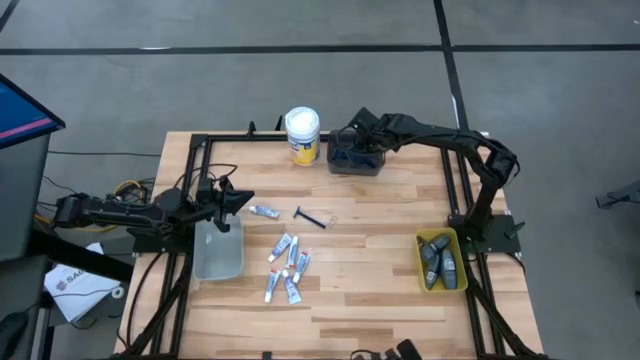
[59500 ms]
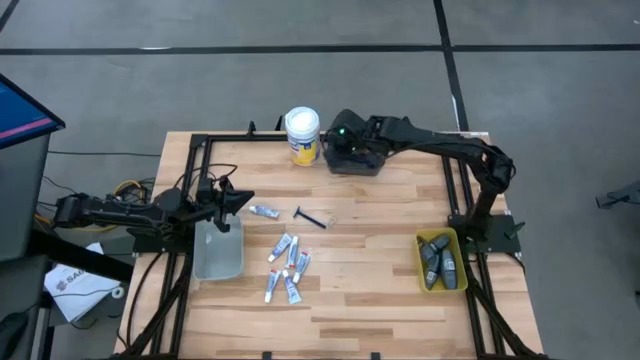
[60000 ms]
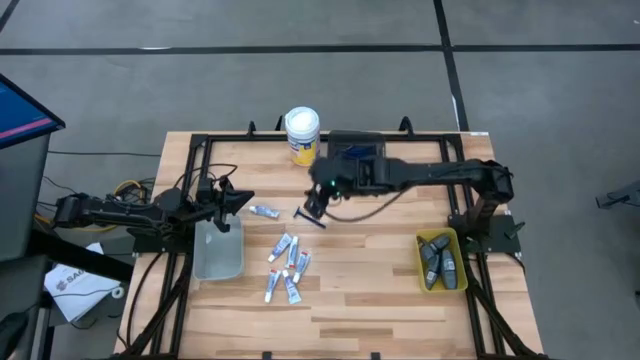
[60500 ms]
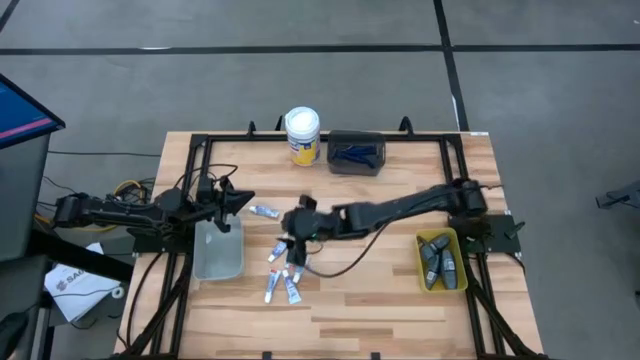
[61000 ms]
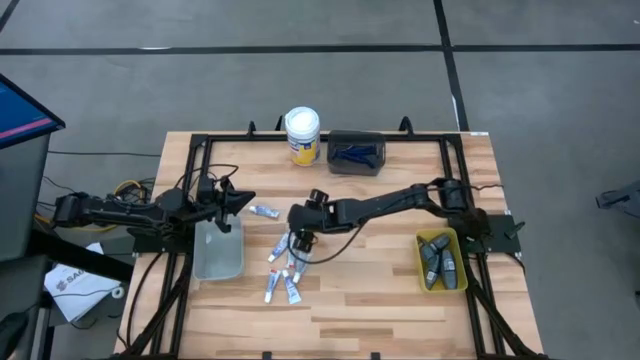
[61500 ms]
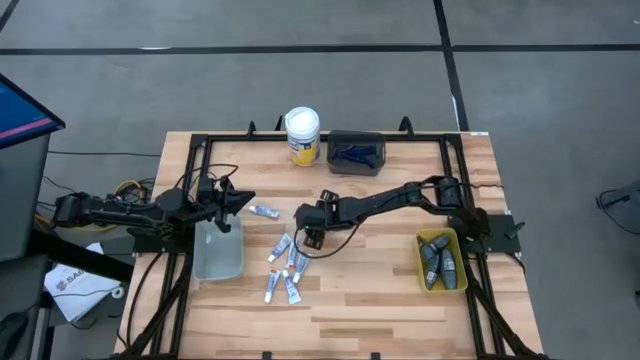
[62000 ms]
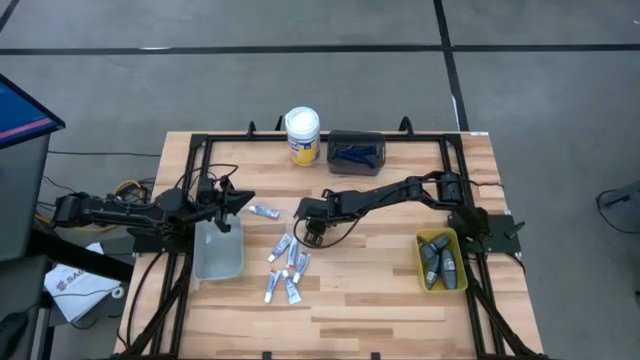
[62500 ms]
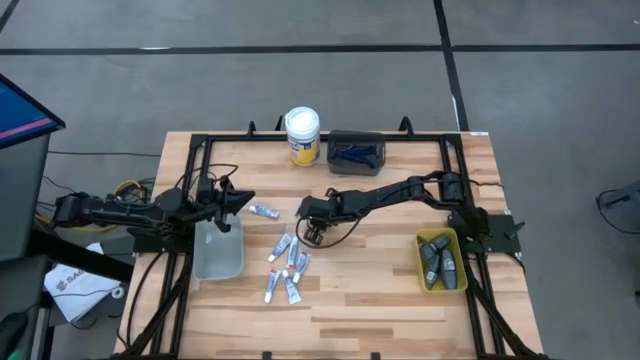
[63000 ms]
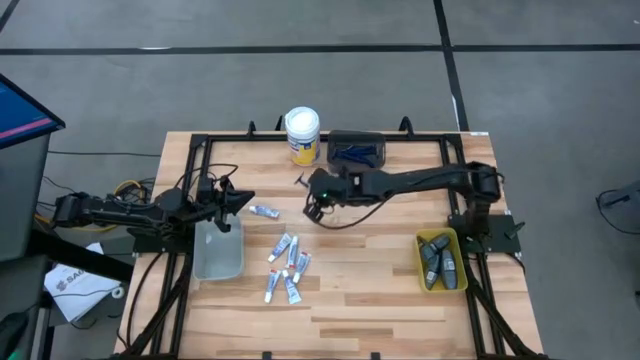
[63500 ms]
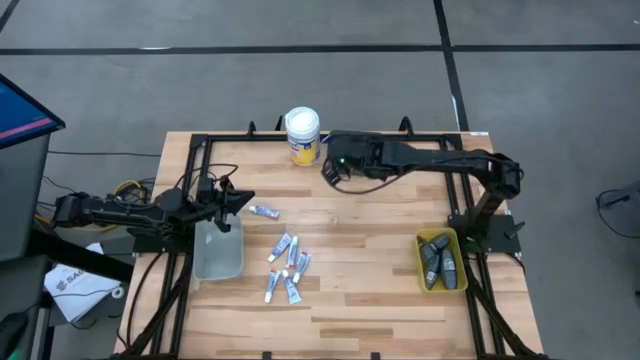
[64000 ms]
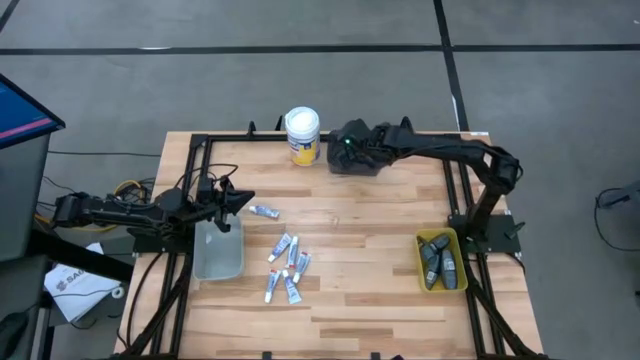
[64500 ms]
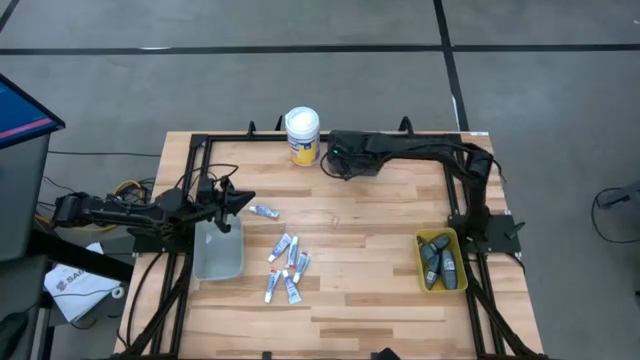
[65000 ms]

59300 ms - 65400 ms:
Task: Pick & Place Travel size toiletries
Put the blue razor into the black bin

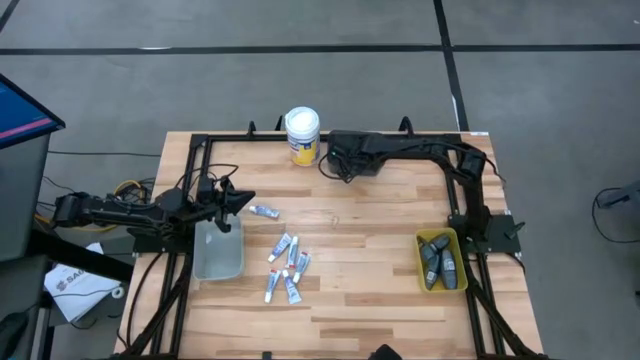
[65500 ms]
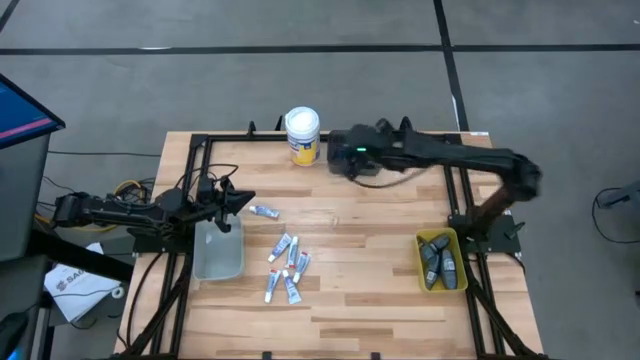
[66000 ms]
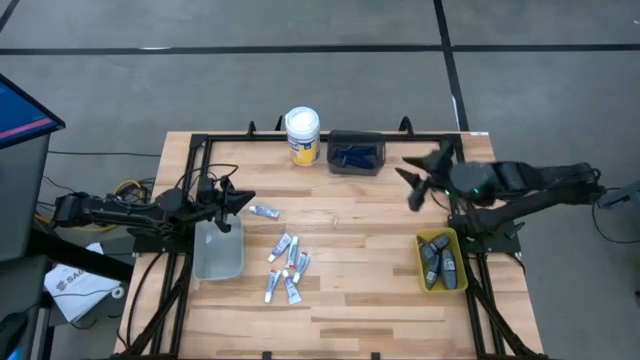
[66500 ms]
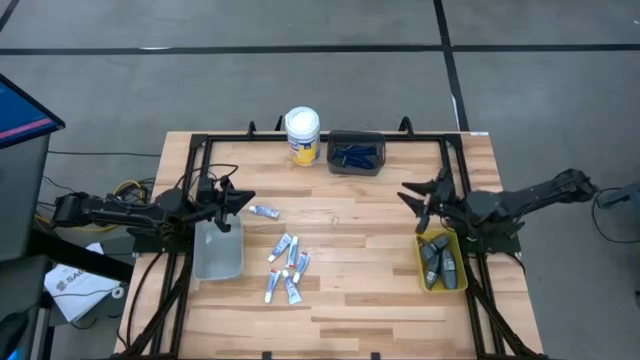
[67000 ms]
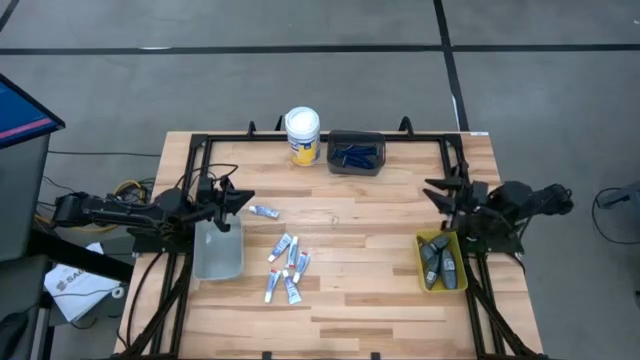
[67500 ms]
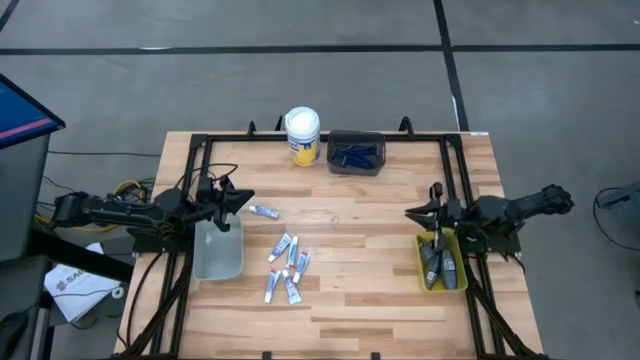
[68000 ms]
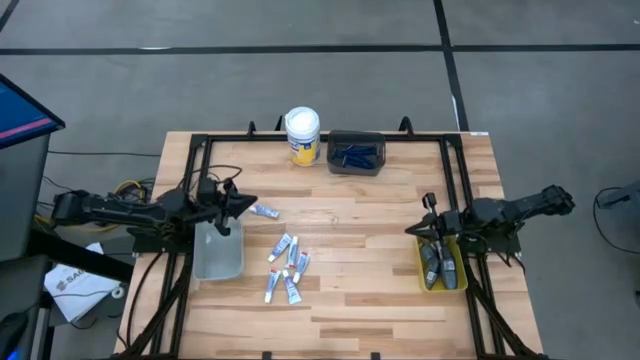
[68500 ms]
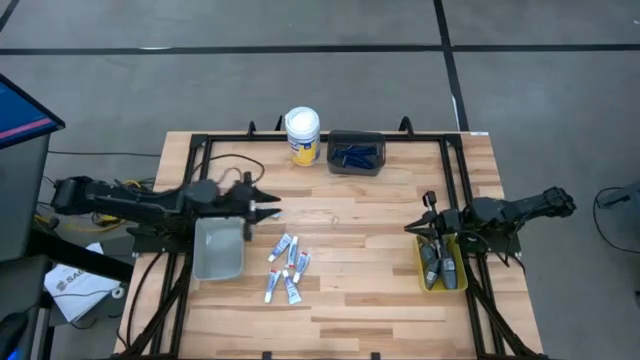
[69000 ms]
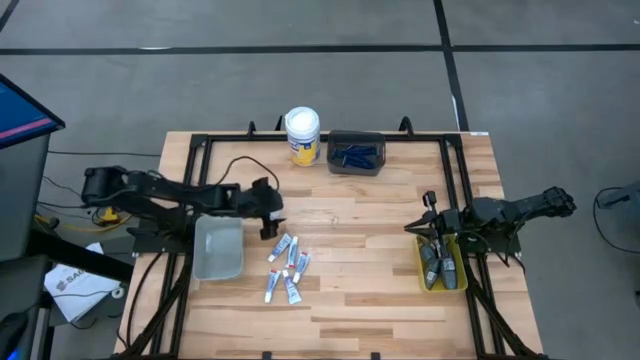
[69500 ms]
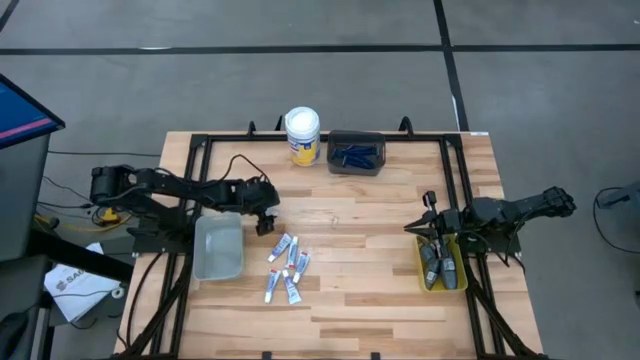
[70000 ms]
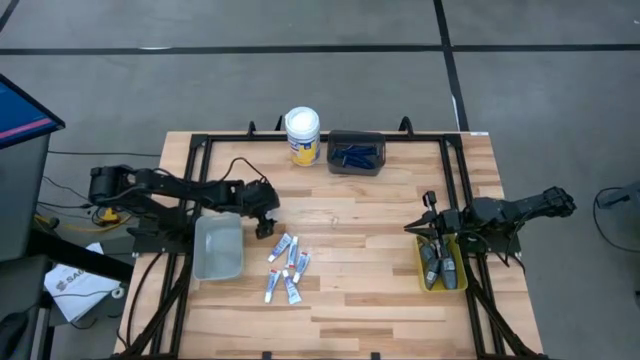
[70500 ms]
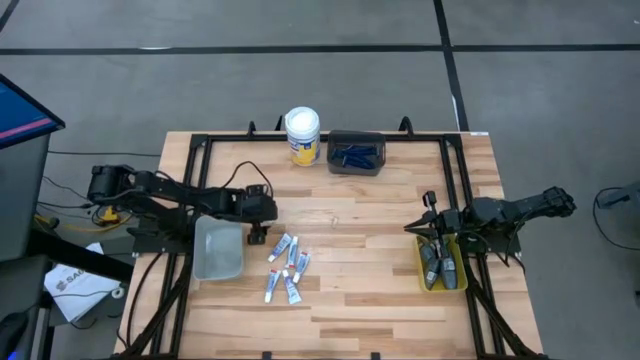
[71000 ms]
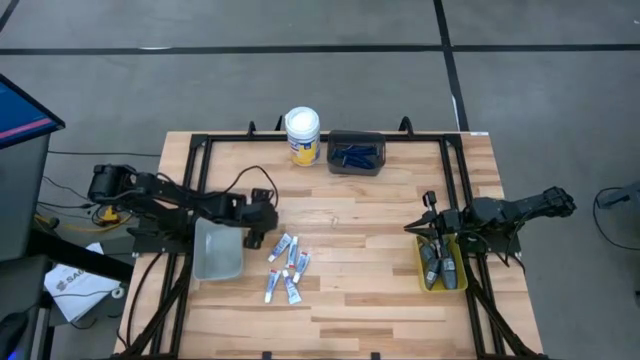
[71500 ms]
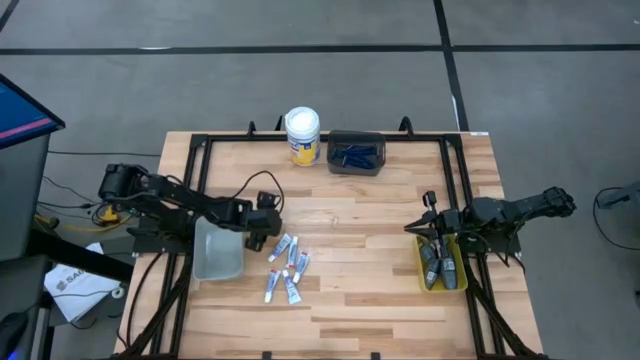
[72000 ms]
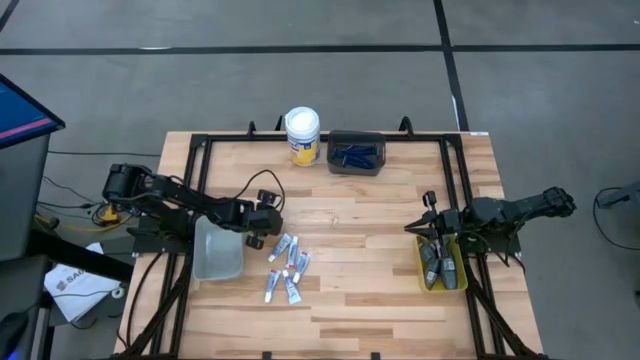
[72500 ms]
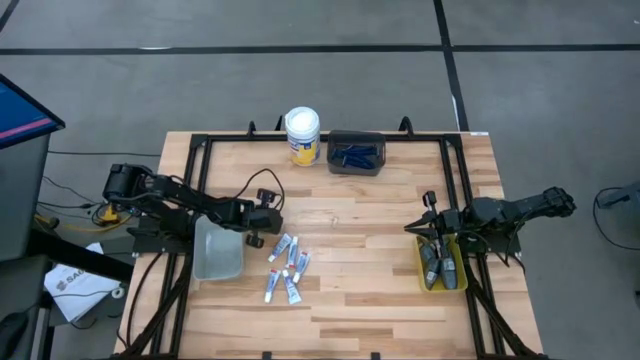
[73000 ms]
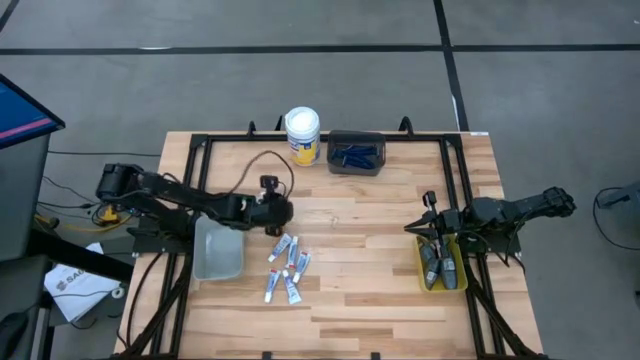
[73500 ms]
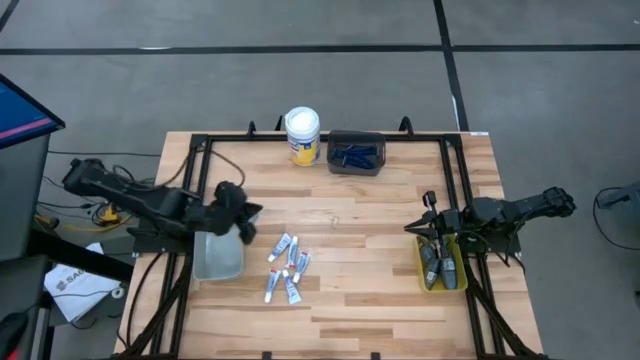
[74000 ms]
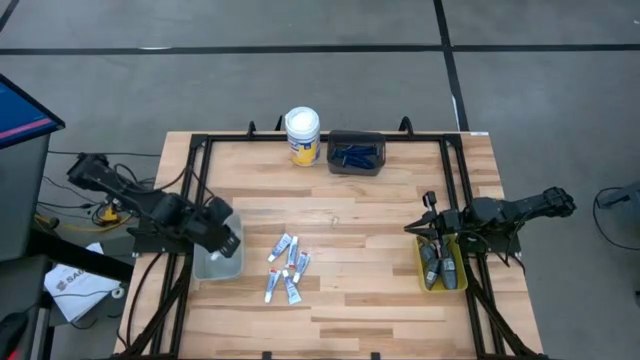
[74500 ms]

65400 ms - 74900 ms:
Put the white toothpaste into the gray bin

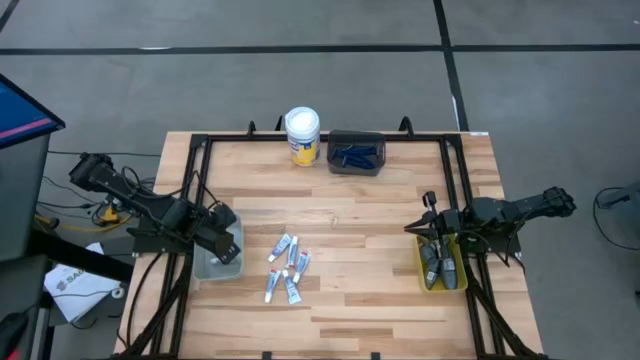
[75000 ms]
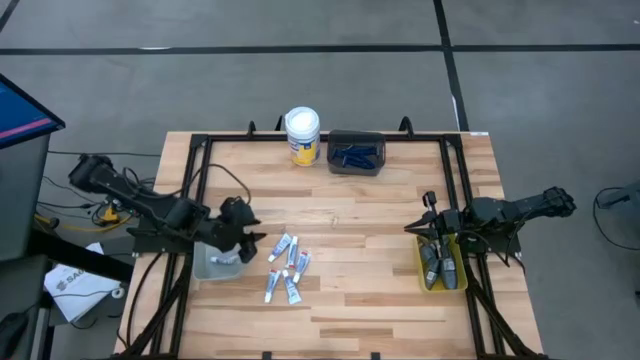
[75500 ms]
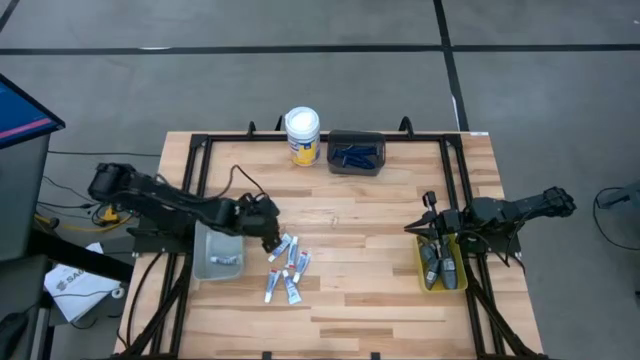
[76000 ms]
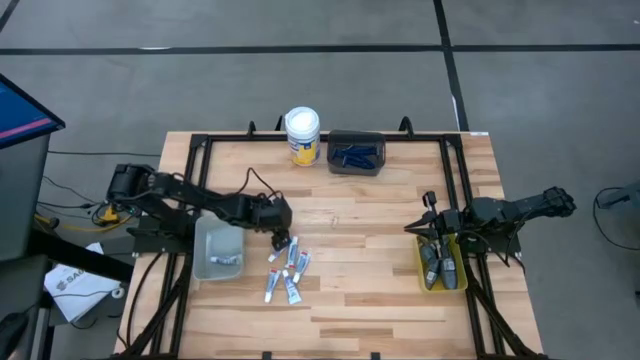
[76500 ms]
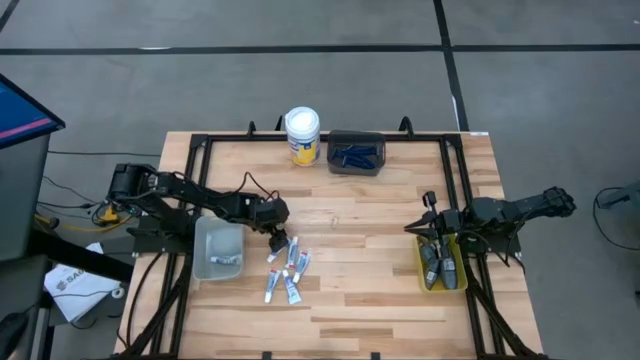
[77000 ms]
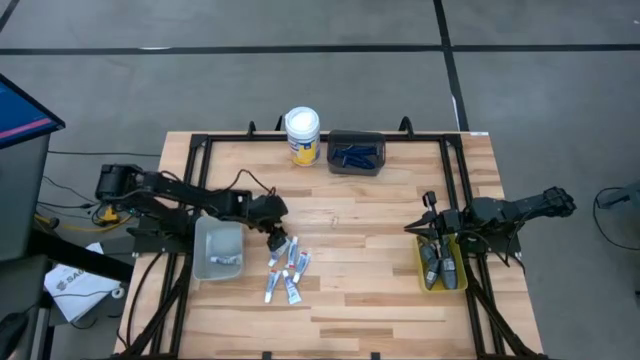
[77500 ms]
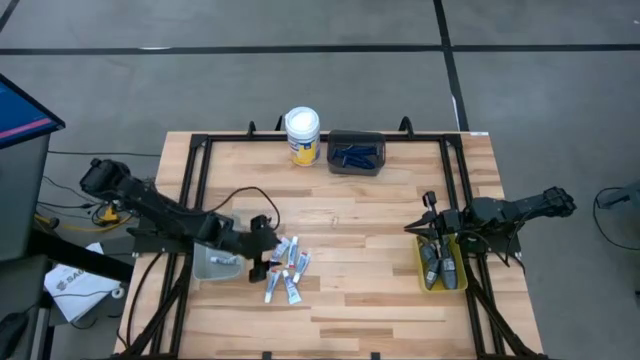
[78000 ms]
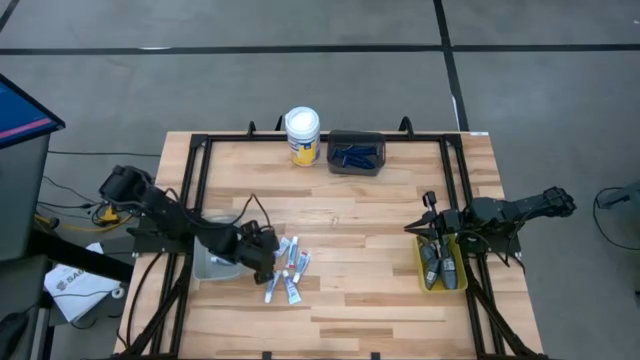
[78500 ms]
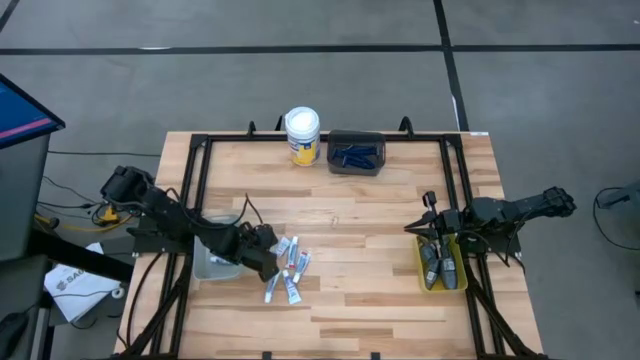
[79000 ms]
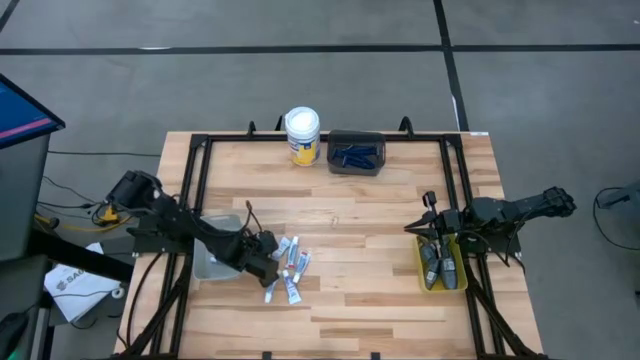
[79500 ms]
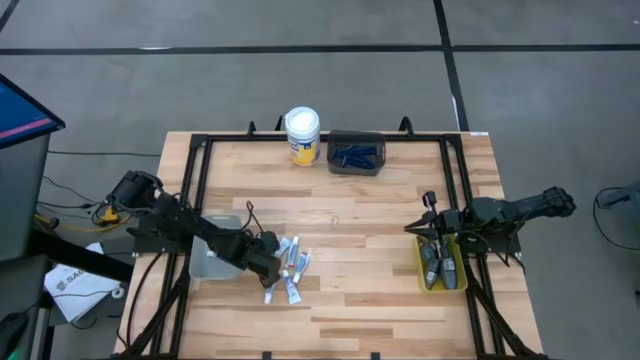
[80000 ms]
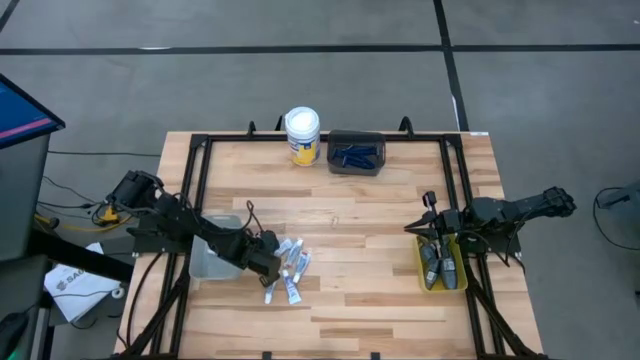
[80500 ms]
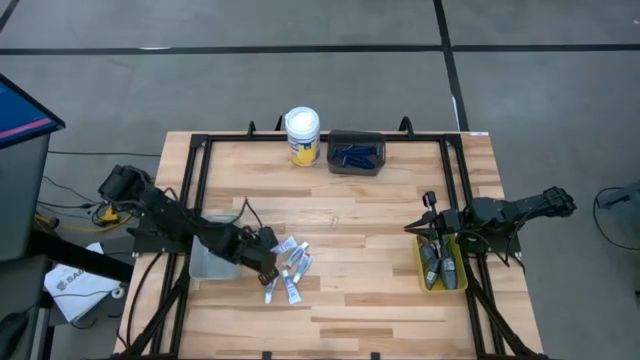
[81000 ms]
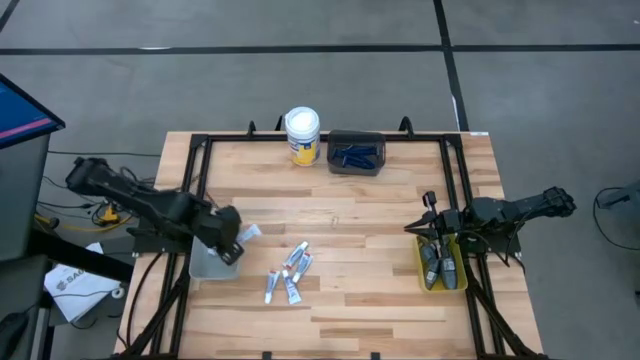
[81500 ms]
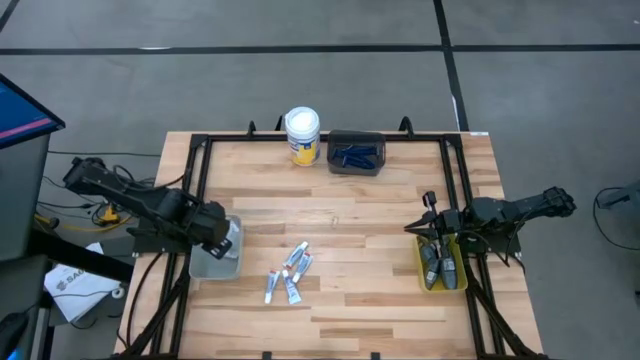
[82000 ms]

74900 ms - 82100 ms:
Put the white toothpaste into the gray bin
